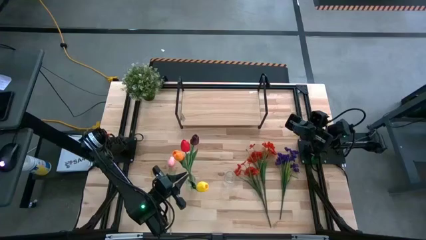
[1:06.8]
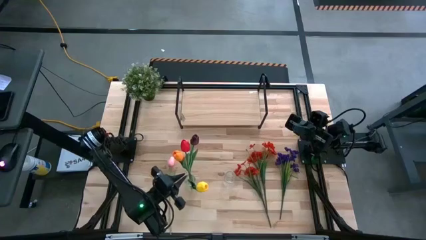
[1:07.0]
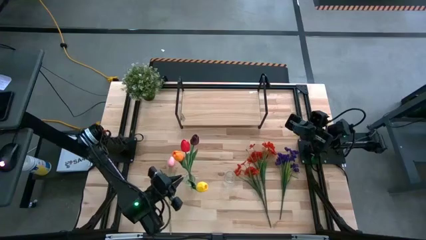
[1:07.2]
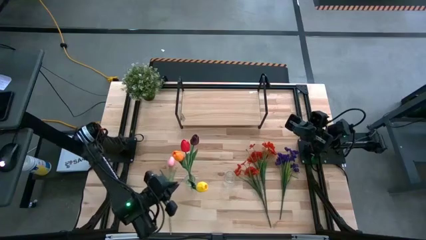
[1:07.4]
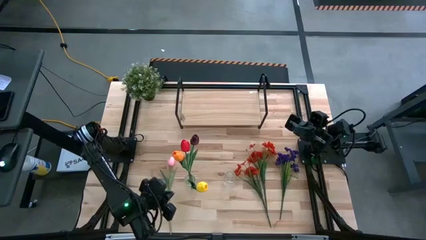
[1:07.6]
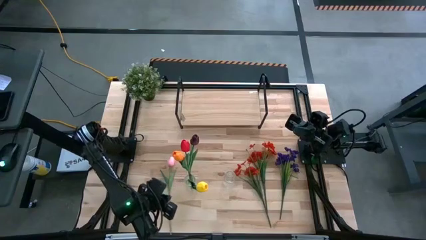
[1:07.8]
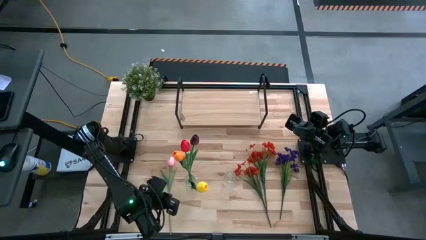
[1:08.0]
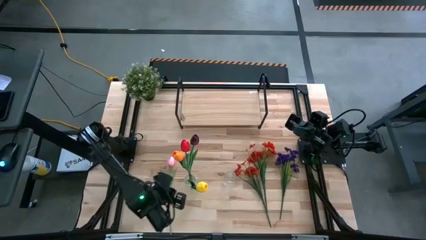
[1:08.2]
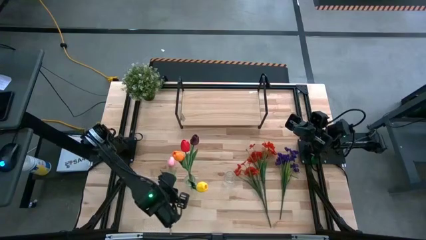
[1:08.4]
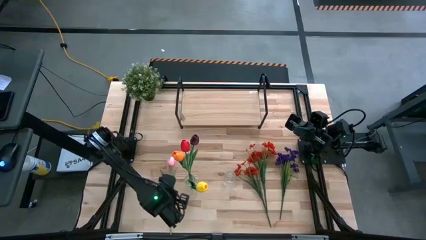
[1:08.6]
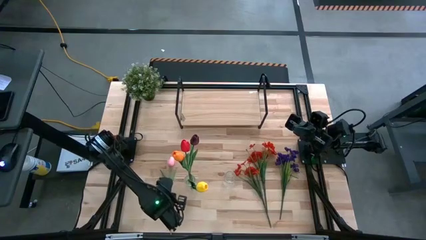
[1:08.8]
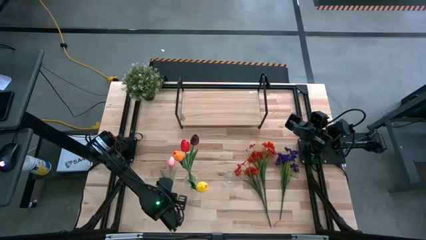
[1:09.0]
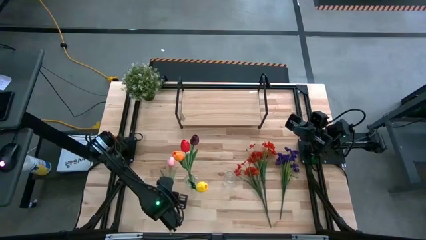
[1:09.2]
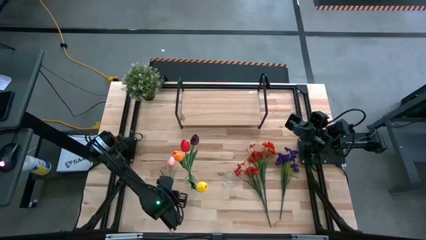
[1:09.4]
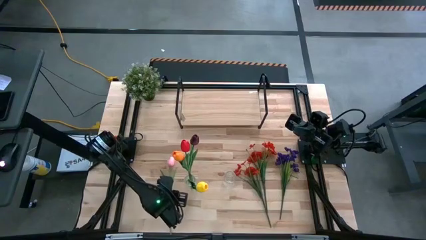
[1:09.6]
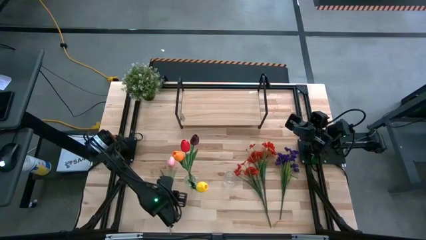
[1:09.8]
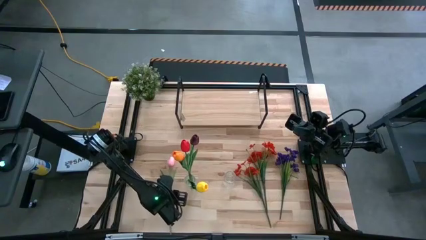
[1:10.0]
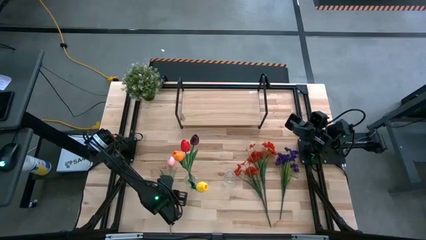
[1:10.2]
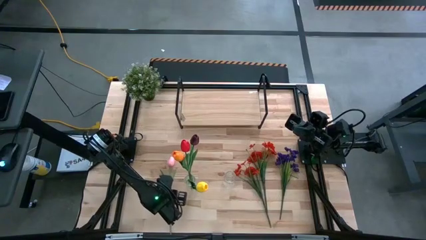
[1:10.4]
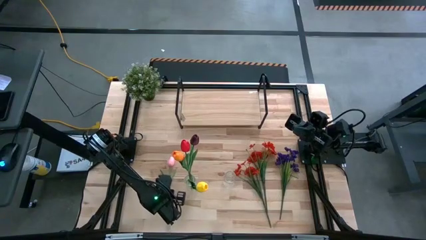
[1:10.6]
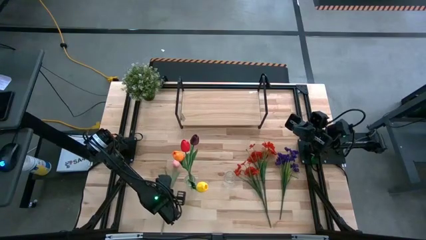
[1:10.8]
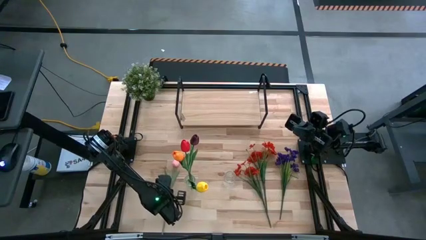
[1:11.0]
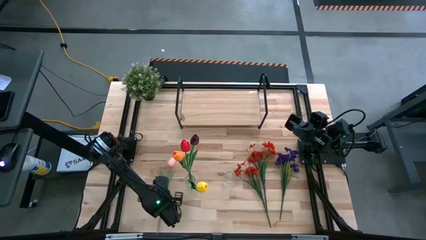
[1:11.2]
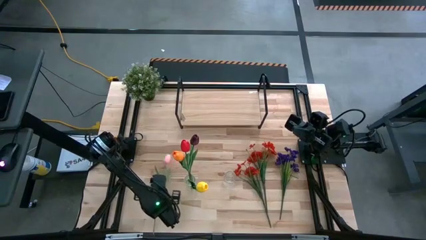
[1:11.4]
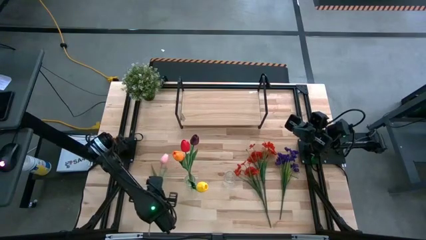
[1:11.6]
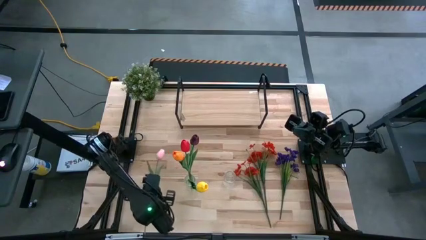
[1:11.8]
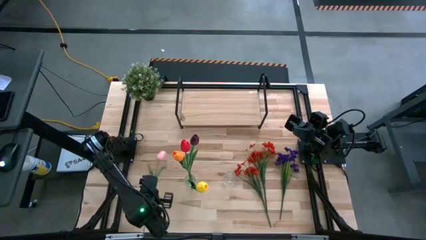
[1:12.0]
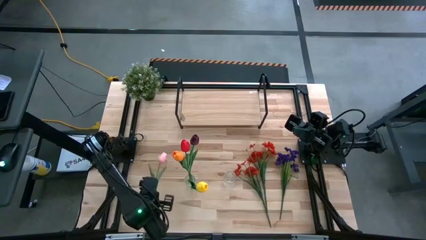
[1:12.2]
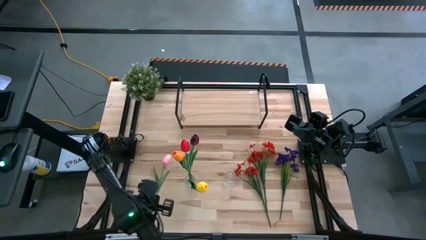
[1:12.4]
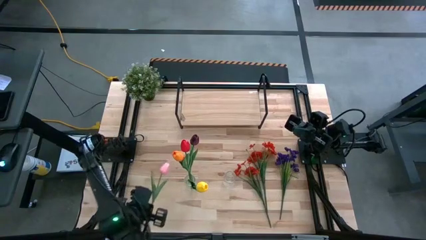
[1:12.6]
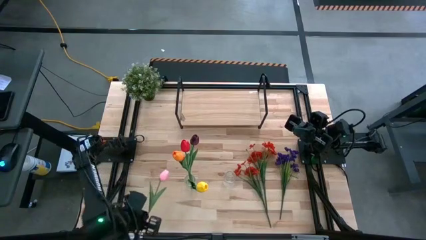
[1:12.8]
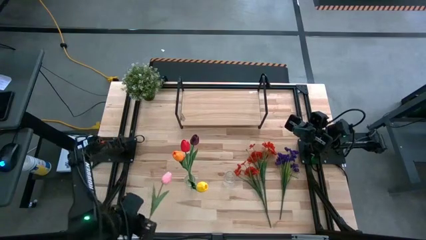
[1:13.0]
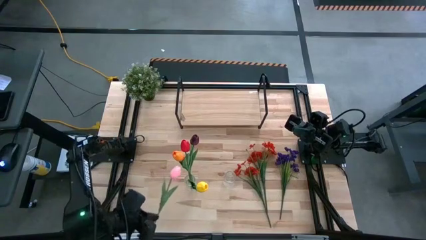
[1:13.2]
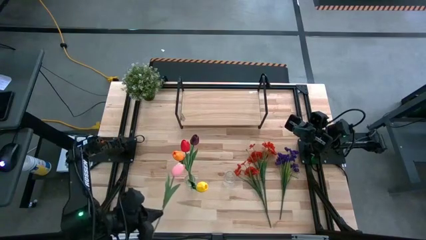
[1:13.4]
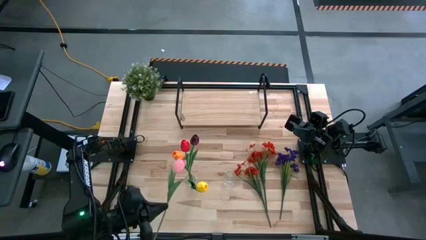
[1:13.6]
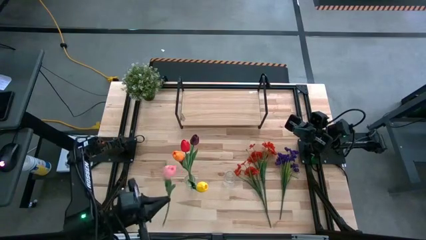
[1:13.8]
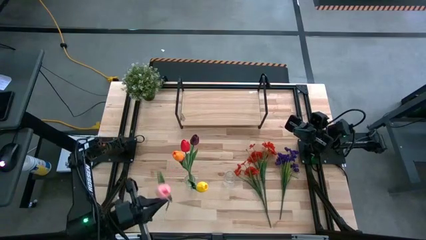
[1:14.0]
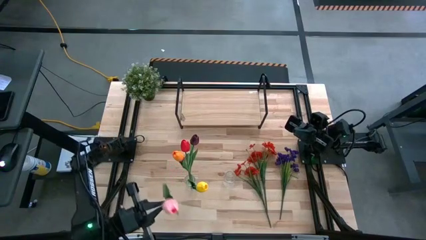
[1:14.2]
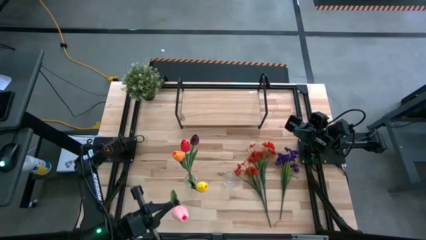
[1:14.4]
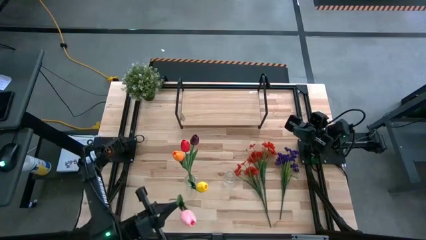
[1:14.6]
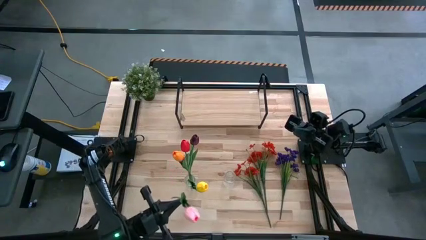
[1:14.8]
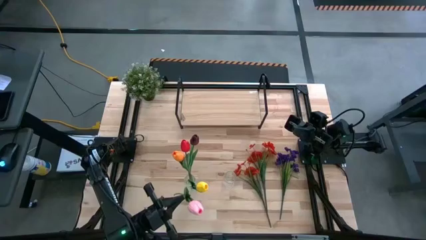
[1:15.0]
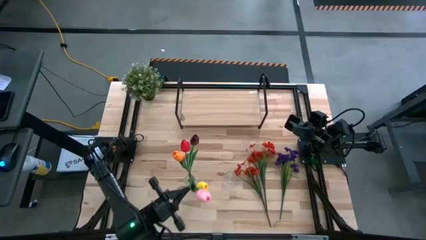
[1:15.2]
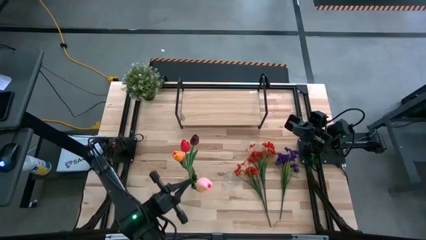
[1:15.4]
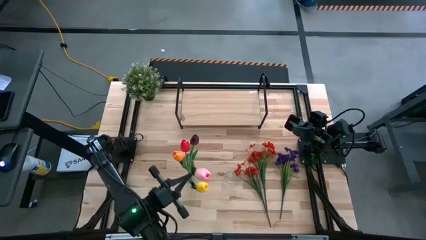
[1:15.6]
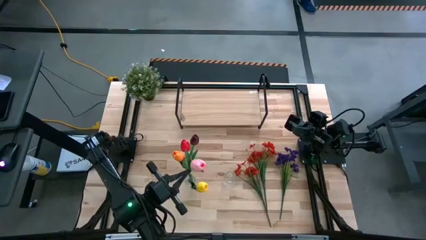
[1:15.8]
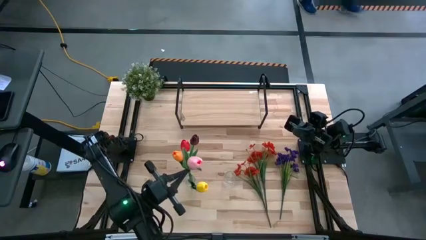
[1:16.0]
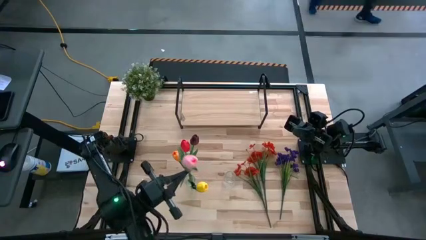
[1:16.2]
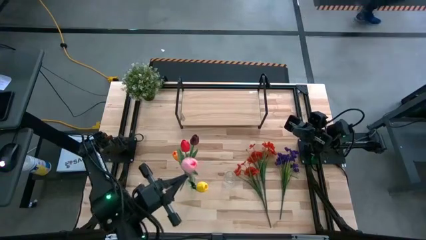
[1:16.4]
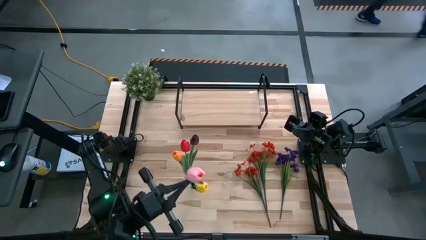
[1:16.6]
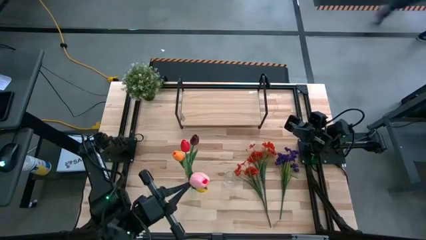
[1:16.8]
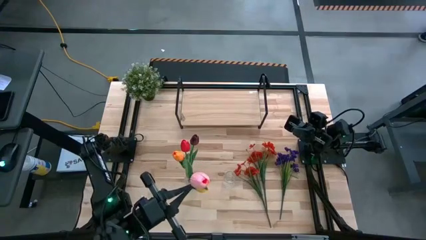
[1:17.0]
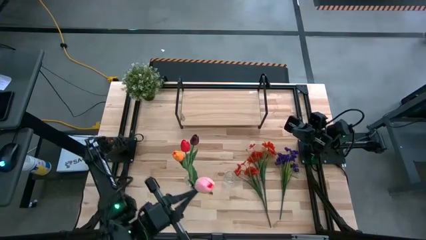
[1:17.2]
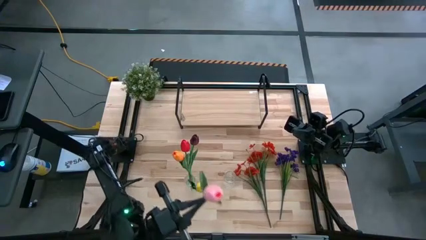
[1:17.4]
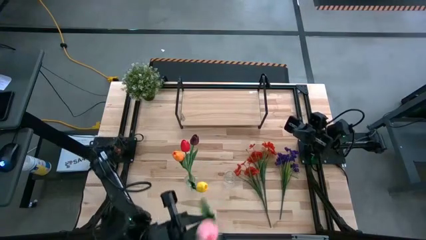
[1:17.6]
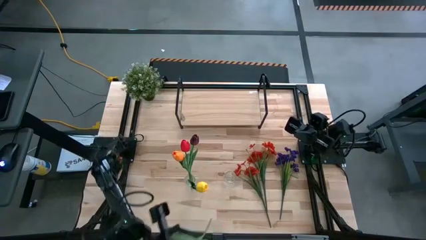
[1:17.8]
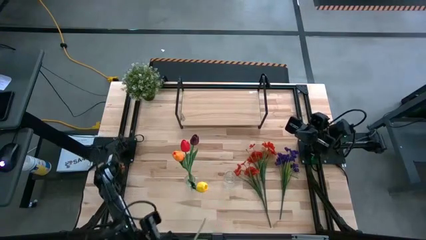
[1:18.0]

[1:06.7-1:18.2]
Task: Pick and place flowers into a vace then onto a shelf
Put the pink flower into the left transparent vase
